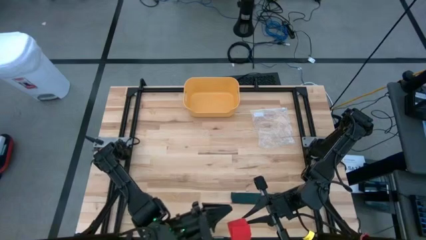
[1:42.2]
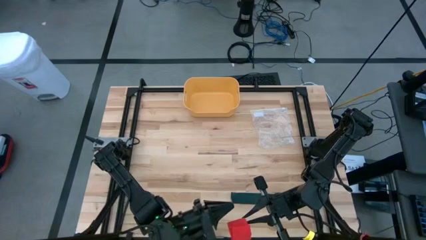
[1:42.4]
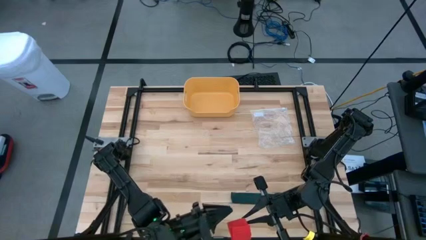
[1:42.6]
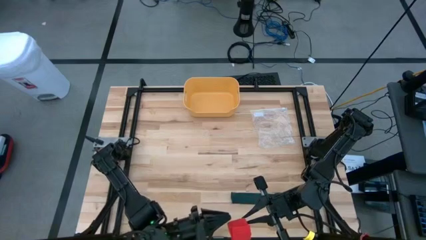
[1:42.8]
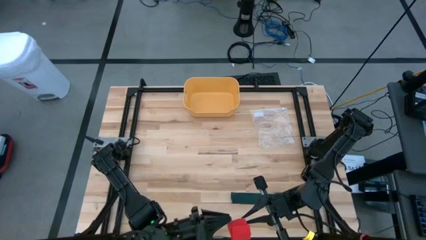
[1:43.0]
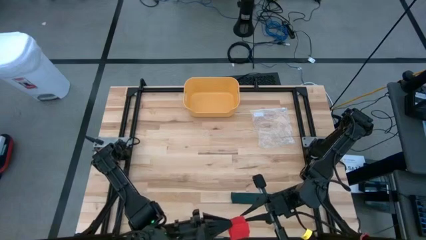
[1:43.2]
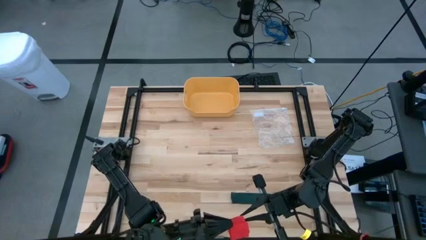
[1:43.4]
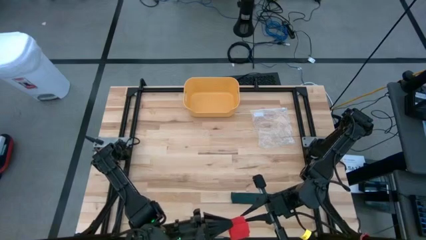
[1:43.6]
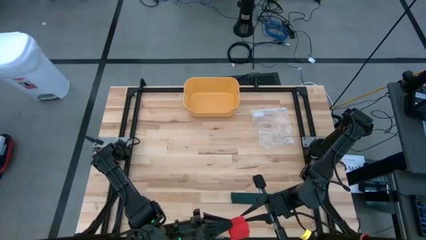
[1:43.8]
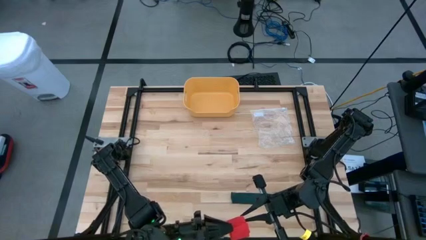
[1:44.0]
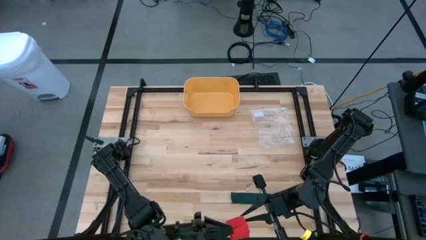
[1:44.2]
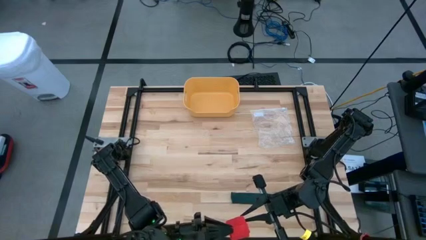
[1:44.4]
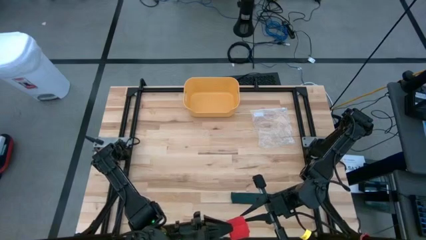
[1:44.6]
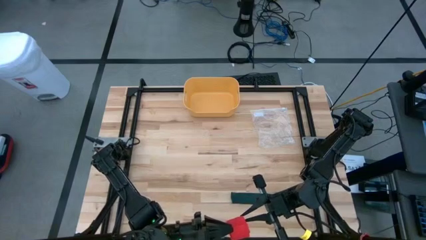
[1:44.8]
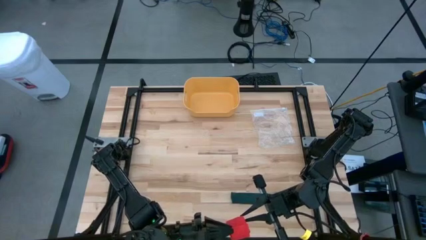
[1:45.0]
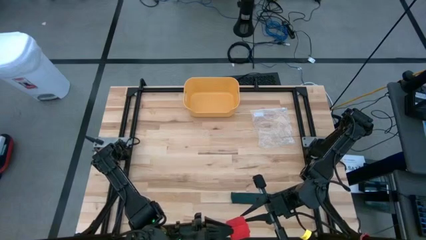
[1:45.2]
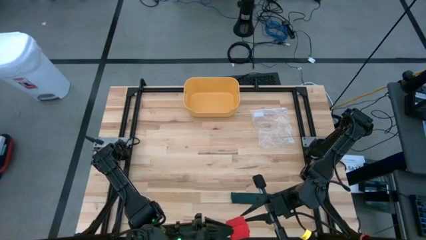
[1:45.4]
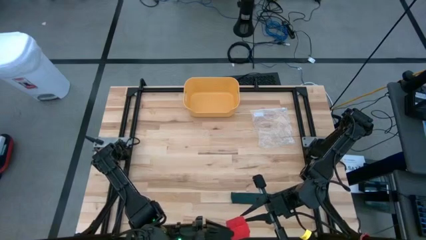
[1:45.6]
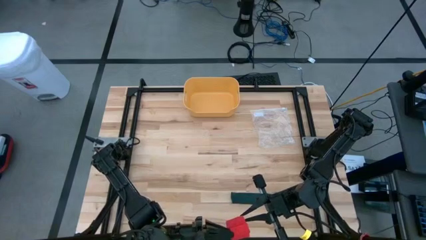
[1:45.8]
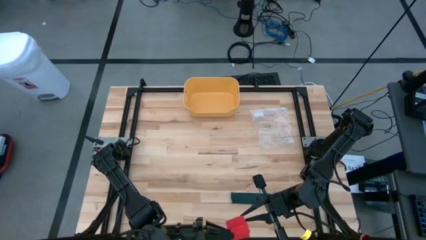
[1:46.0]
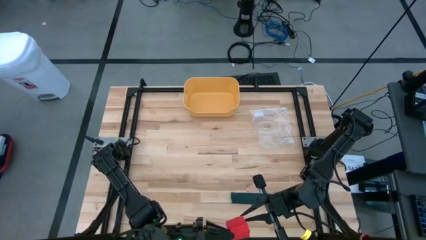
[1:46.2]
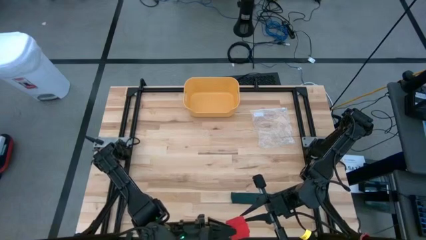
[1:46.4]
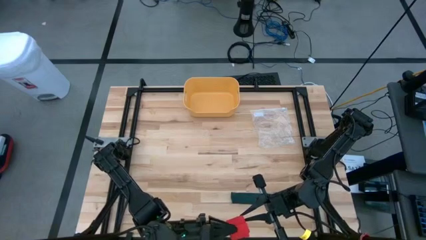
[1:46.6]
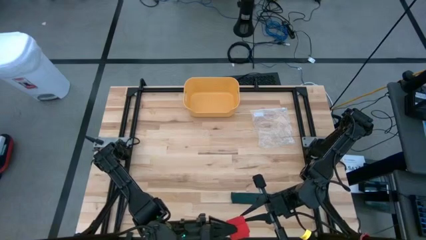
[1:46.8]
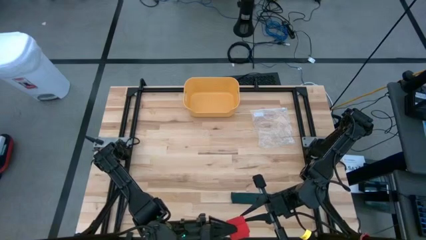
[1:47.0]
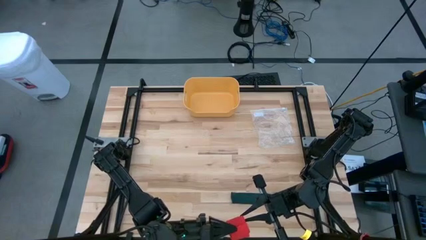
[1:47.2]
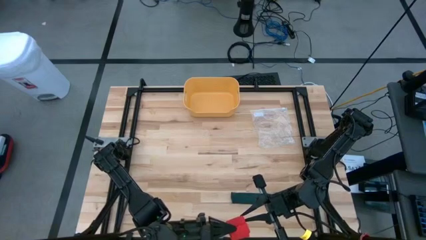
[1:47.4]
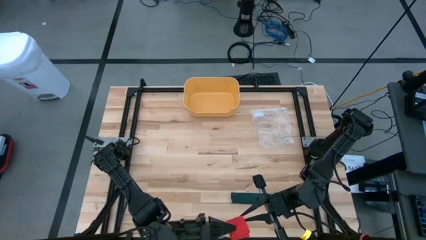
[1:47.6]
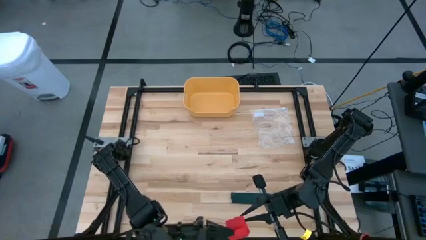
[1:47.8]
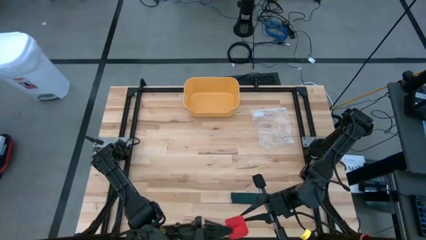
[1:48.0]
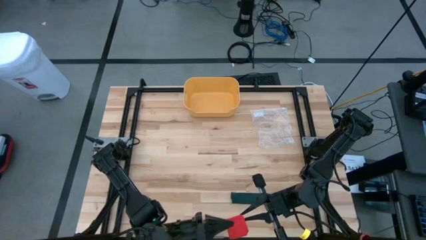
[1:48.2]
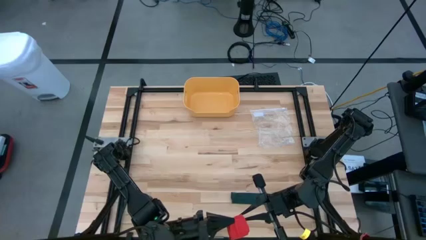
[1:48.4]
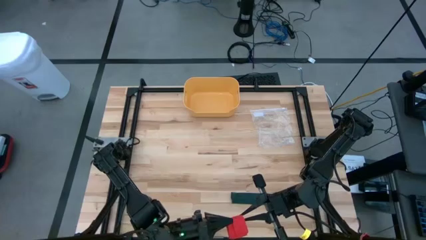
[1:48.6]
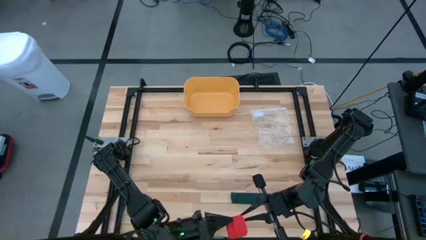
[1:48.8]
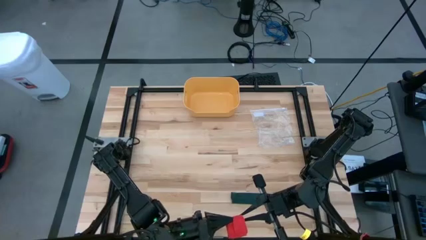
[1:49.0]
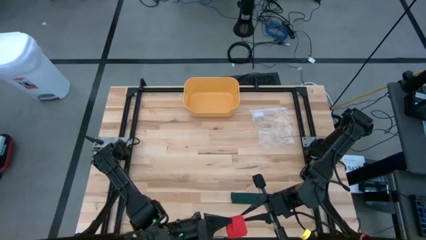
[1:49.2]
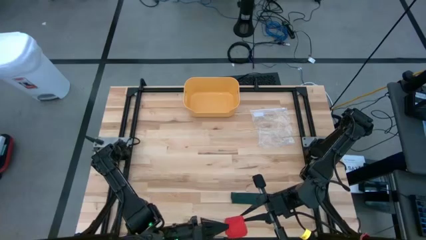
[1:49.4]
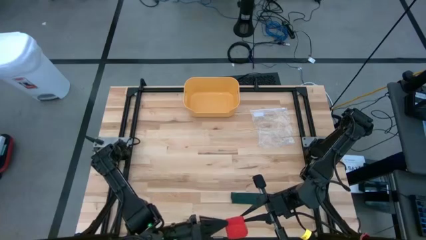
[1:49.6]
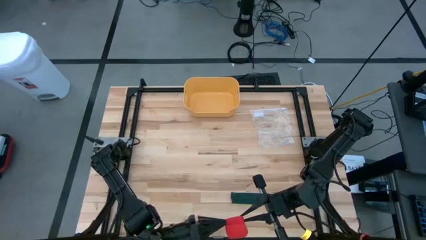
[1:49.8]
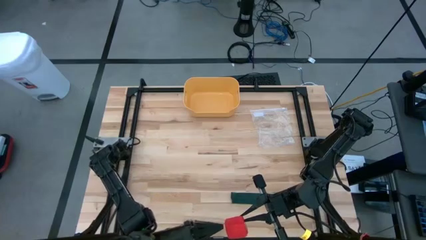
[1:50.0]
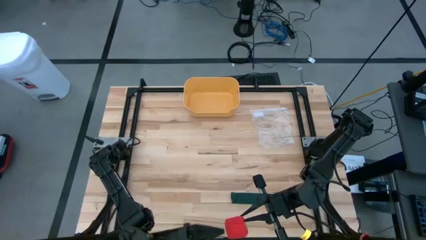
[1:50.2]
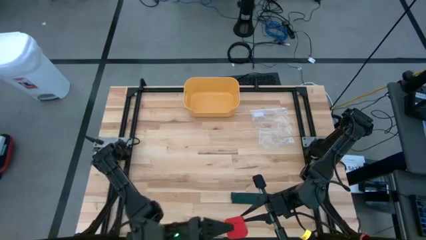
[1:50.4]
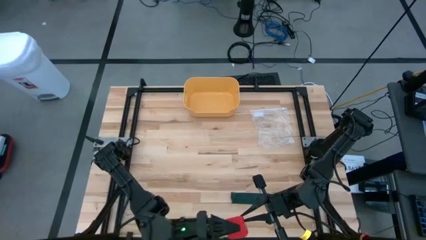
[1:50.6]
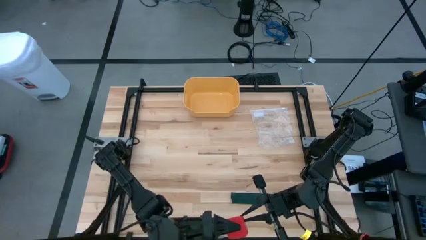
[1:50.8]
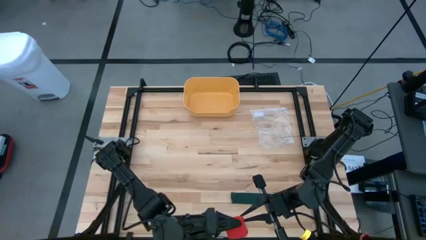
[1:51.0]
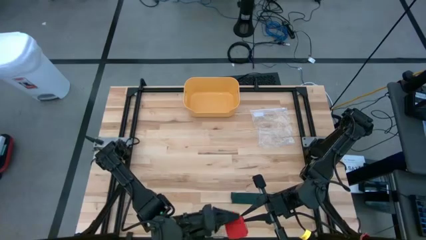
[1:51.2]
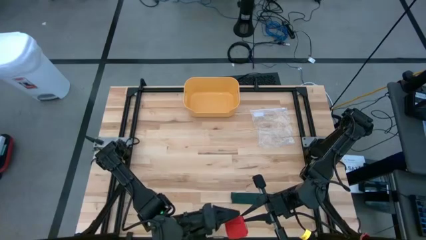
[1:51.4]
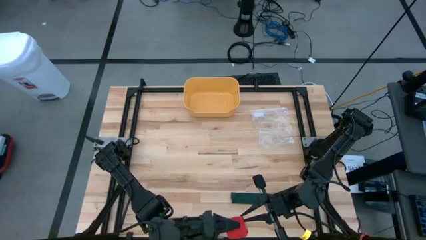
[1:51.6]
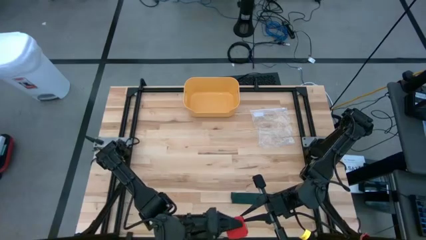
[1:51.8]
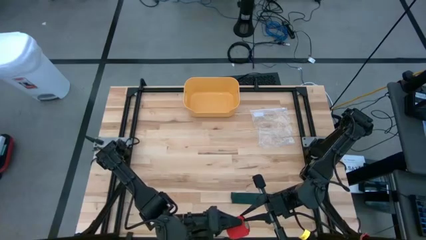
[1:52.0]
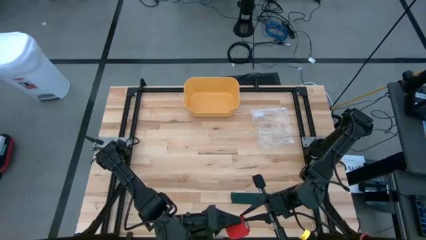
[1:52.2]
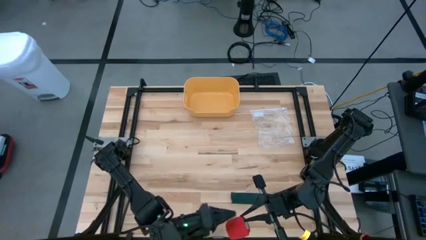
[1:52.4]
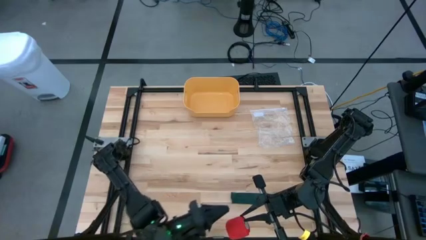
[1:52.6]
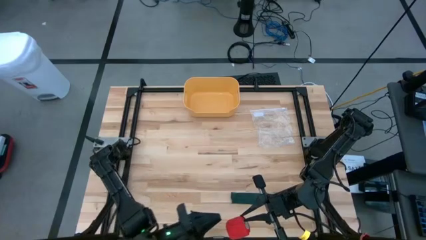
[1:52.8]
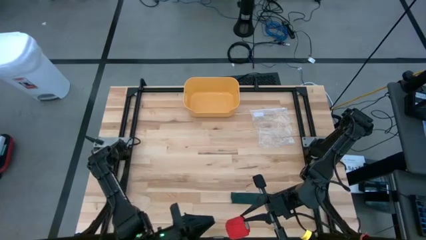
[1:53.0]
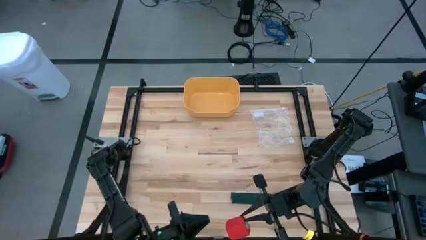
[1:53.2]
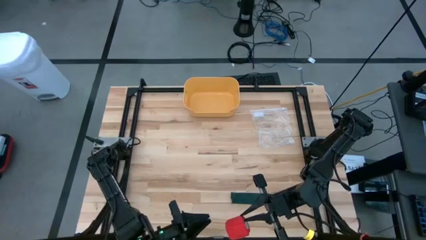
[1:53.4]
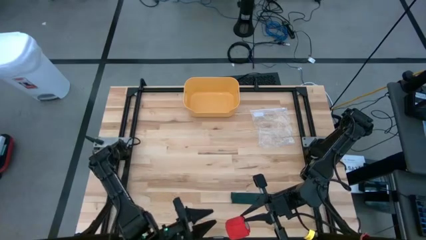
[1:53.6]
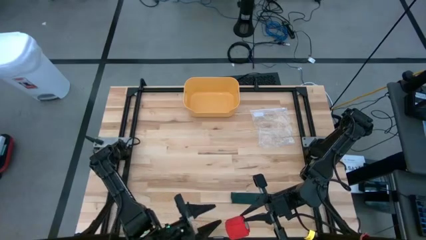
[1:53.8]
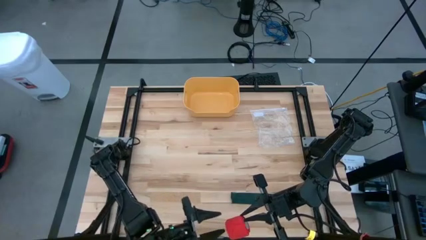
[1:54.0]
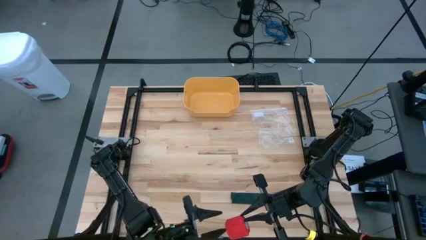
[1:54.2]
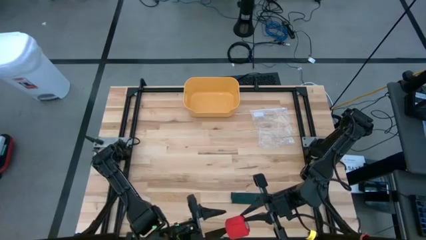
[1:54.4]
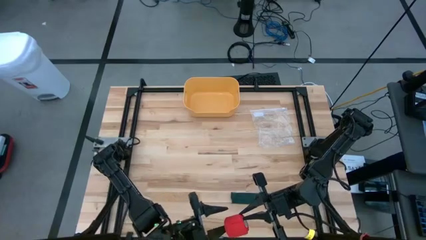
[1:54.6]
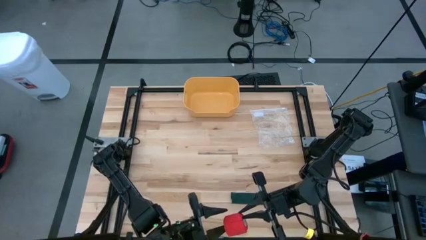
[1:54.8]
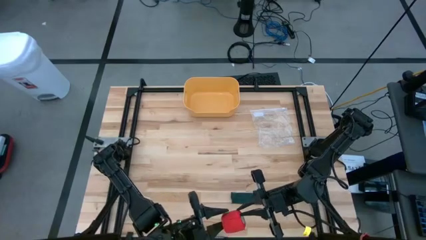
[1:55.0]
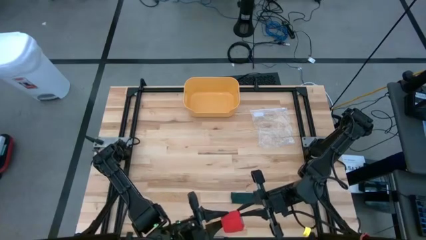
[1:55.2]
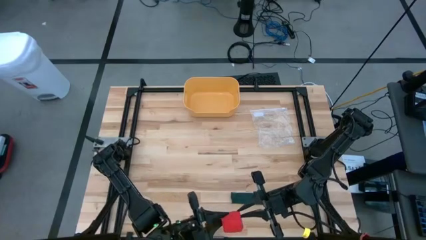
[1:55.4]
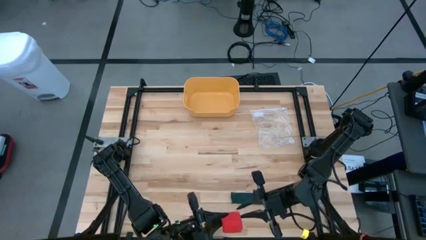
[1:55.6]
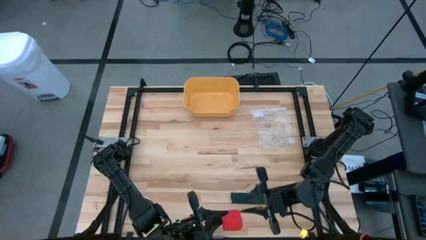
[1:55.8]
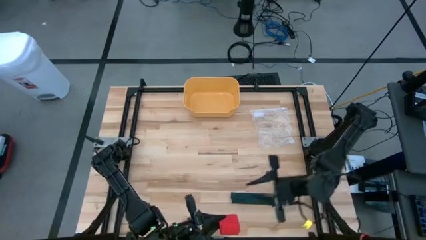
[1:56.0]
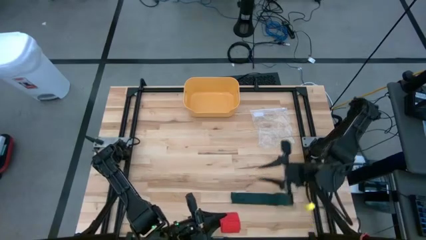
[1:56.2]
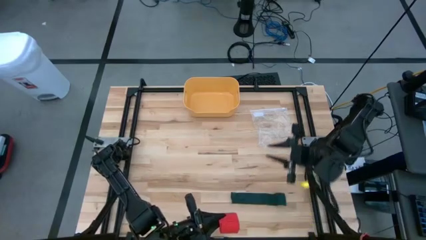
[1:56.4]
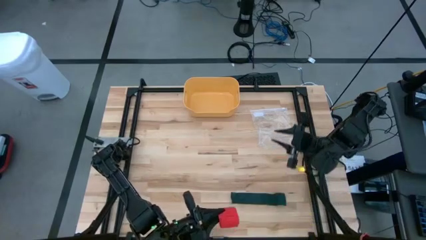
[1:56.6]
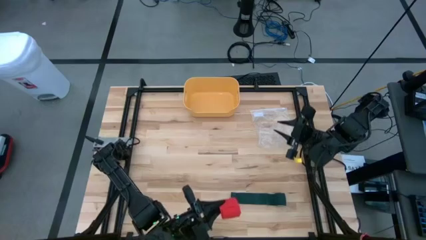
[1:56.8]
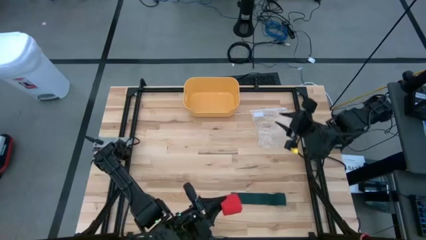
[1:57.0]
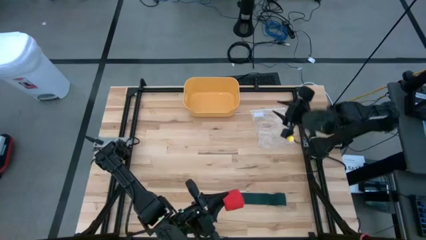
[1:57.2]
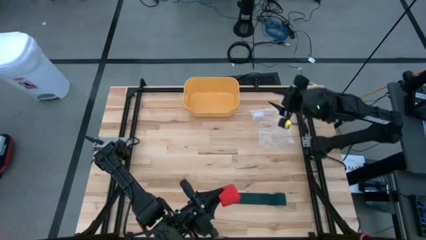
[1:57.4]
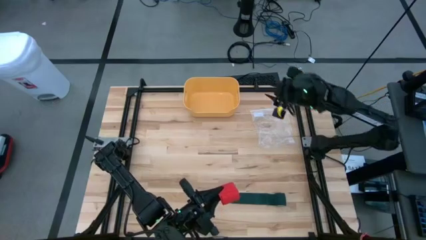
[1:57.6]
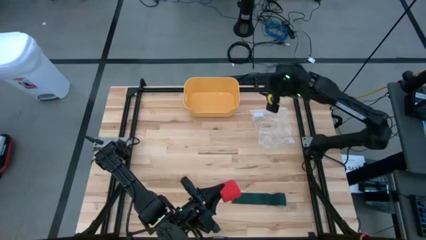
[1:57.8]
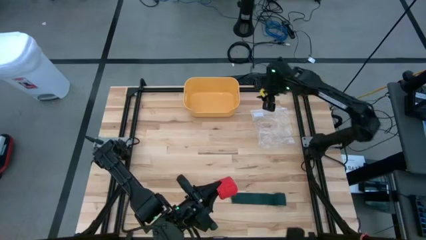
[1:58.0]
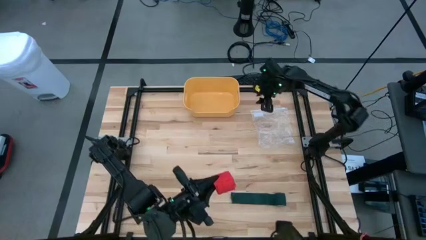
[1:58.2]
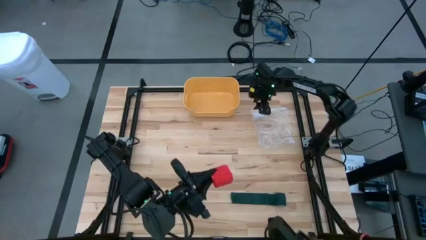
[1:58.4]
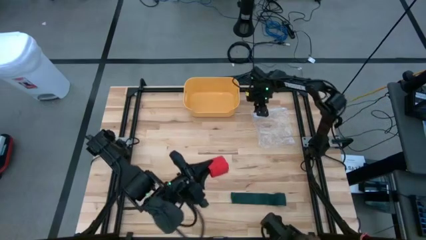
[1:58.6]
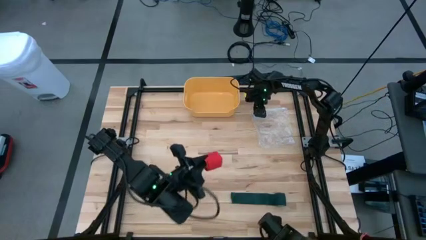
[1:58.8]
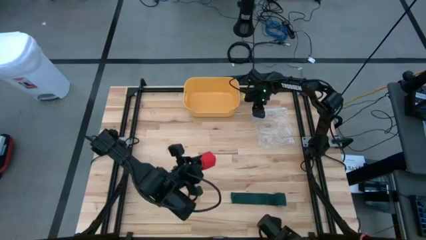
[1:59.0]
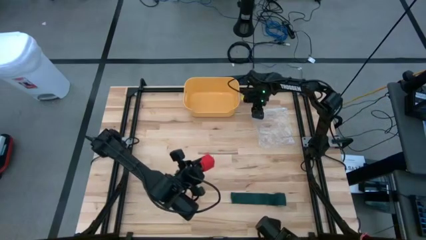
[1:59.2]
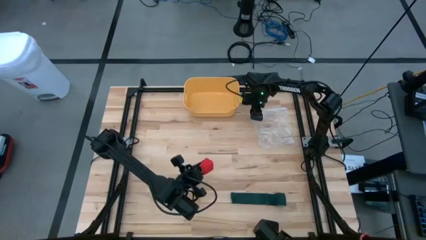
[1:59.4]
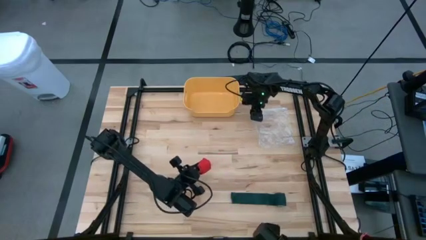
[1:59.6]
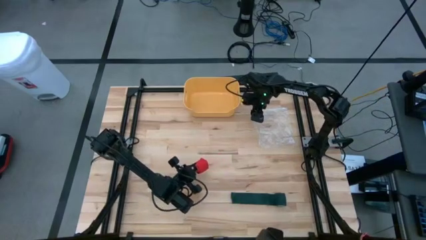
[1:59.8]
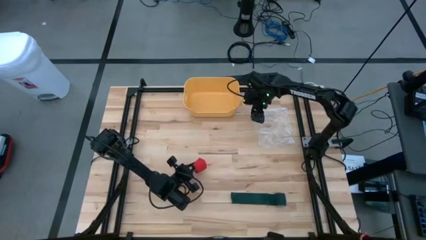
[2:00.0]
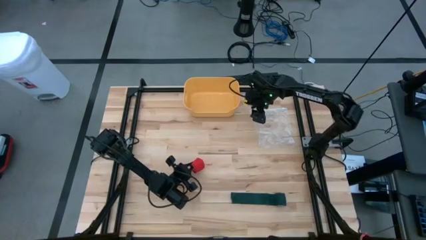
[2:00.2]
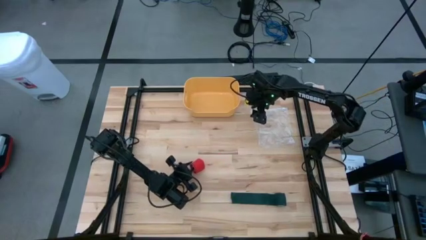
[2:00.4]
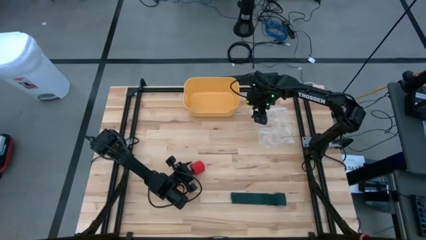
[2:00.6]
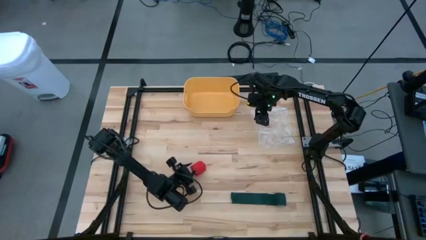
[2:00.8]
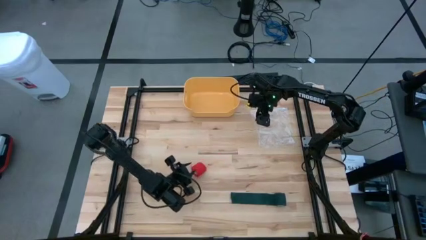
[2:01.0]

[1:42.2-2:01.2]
Task: Roll bandage
Roll the red bandage
